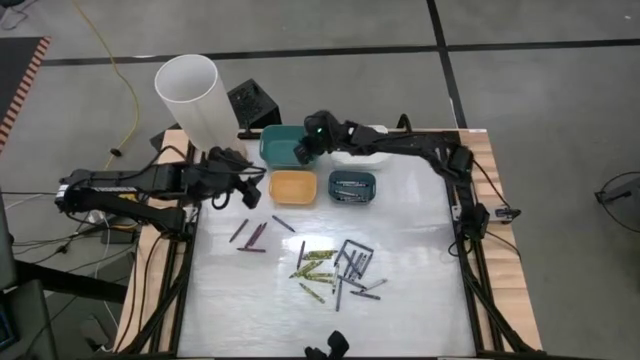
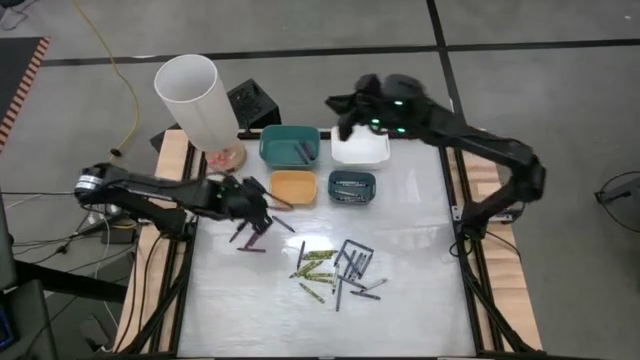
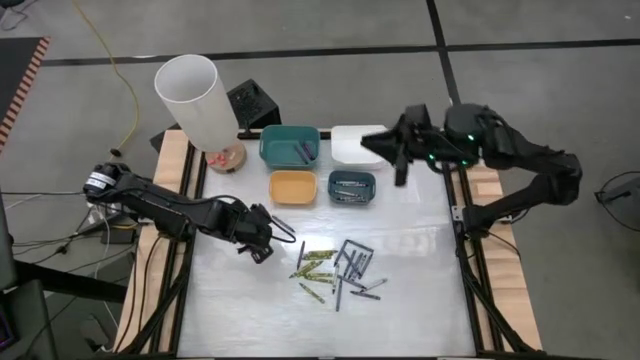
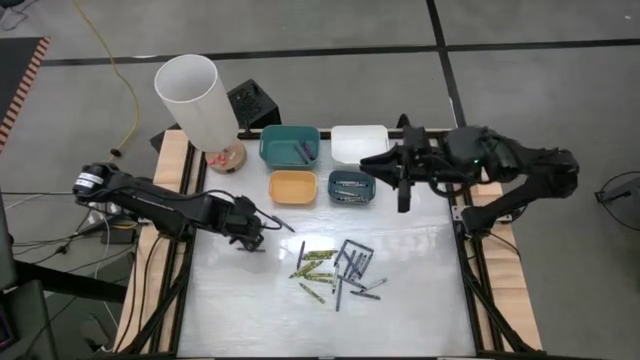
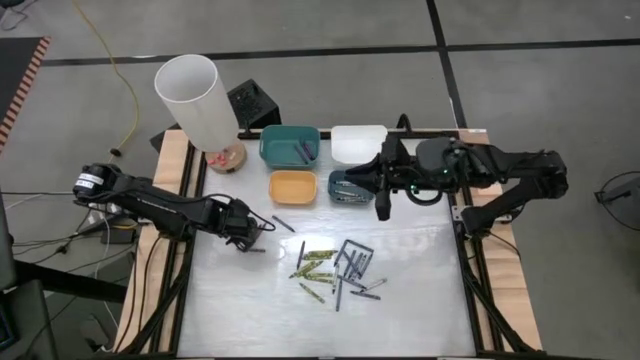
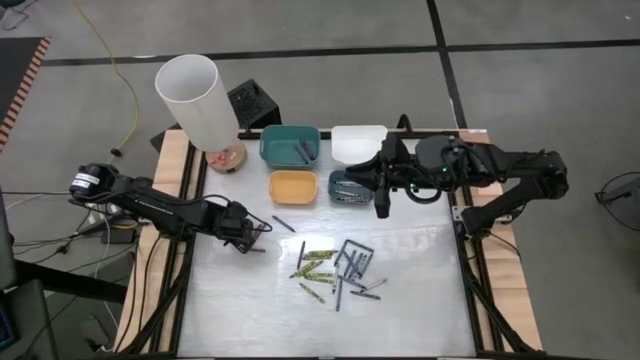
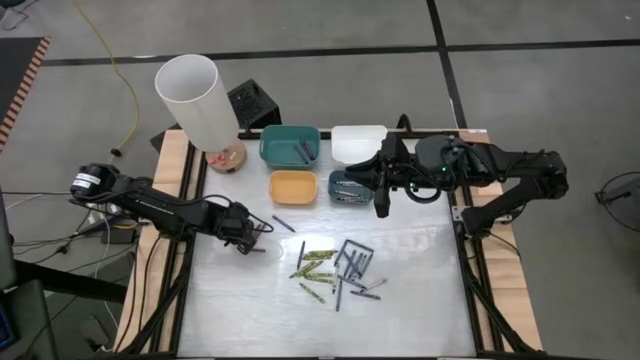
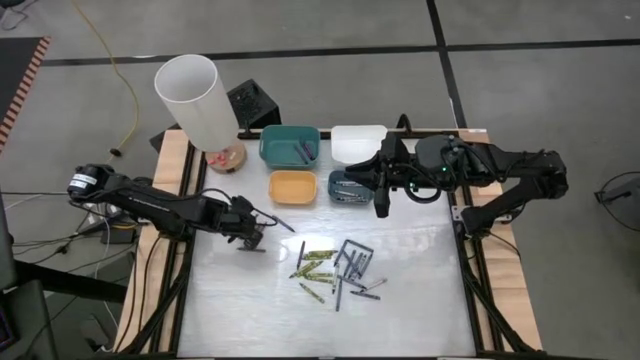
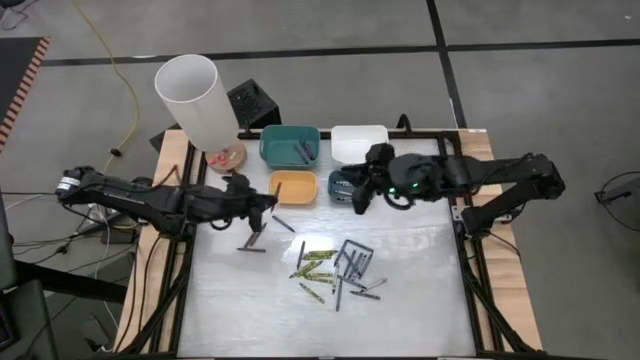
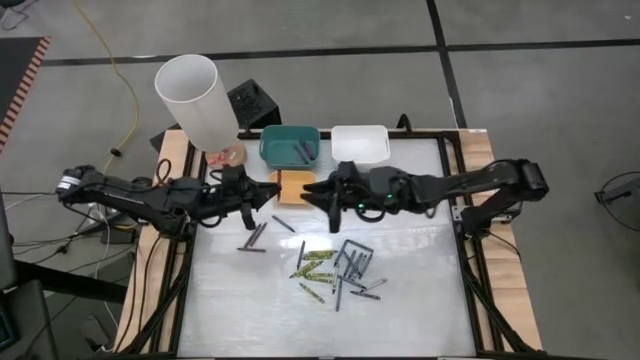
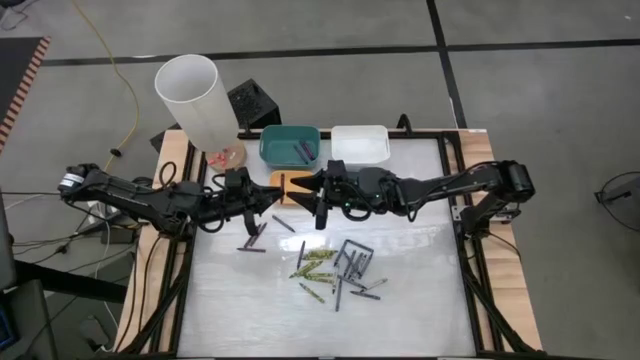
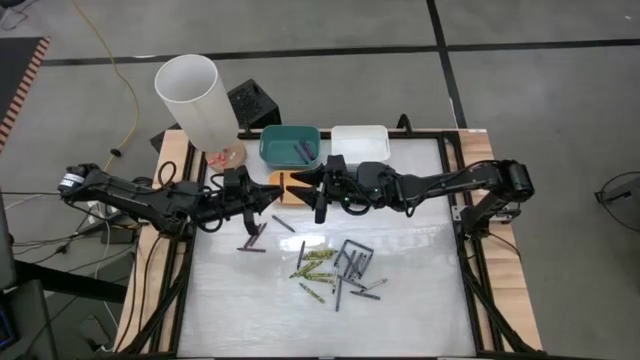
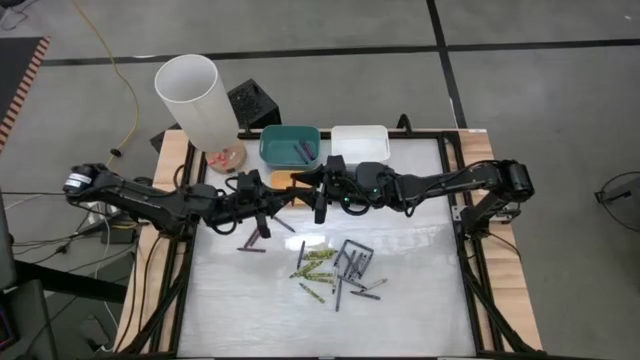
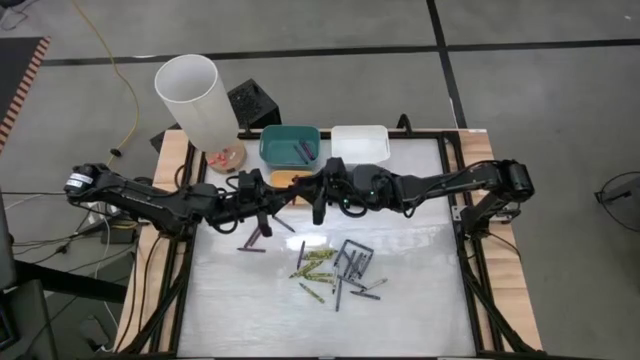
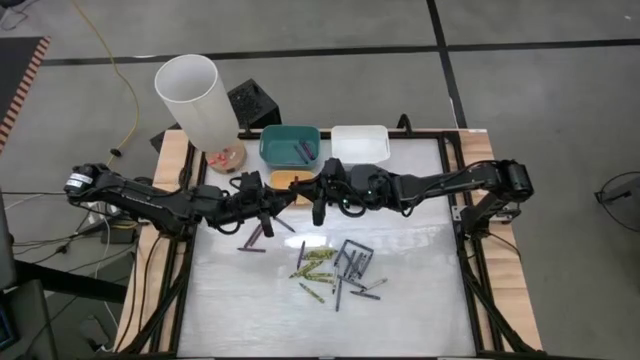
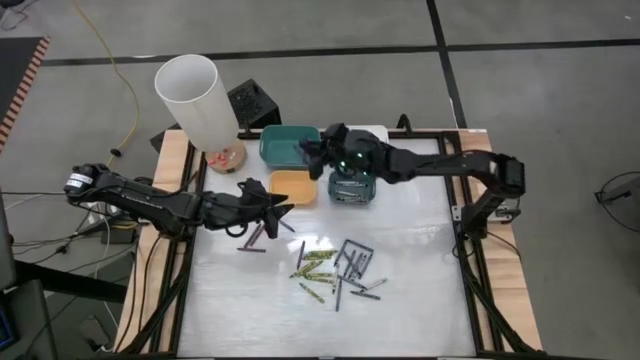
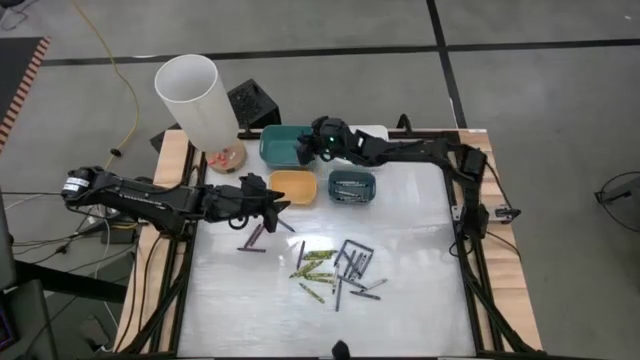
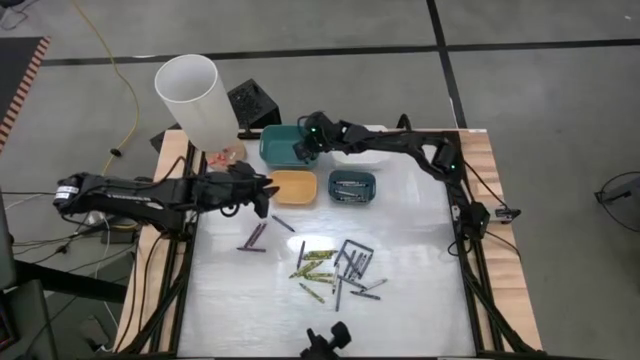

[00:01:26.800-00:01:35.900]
Task: Sort crayons
Put the violet crayon into the green bin

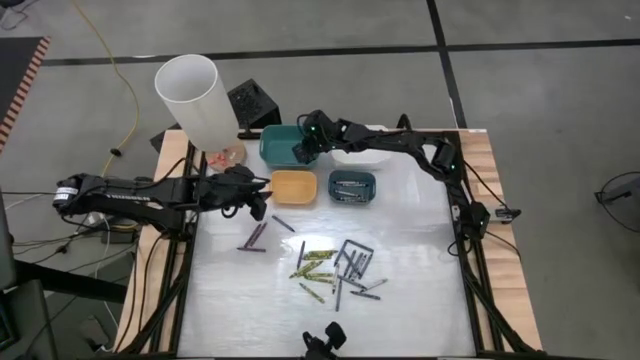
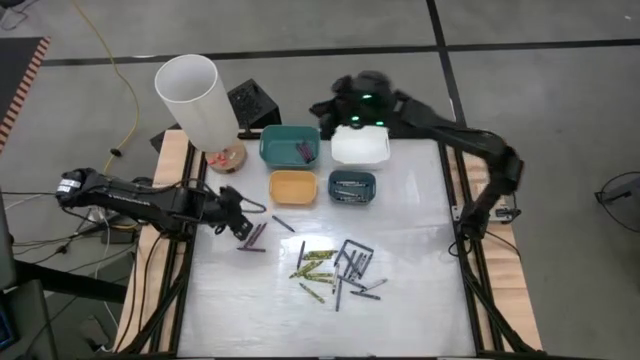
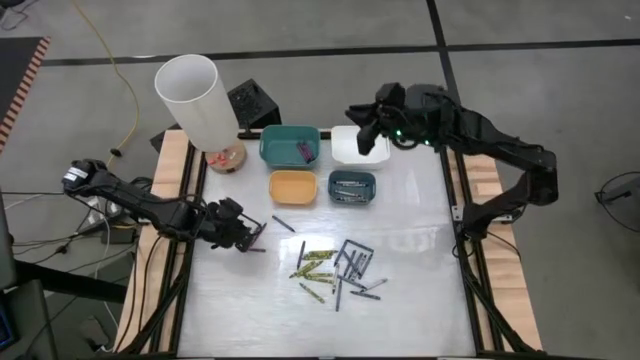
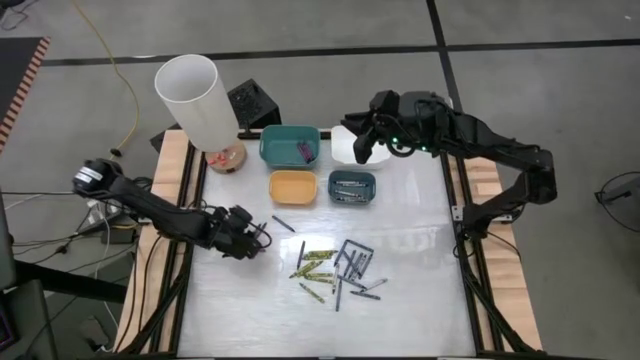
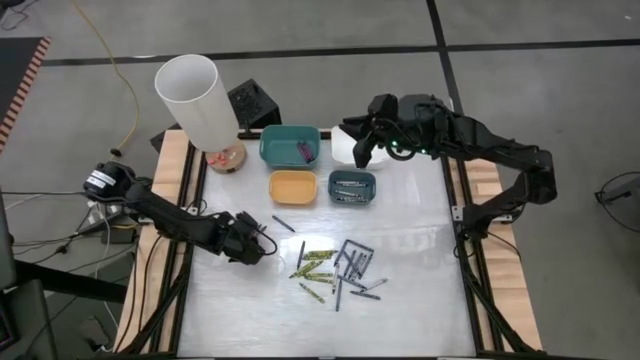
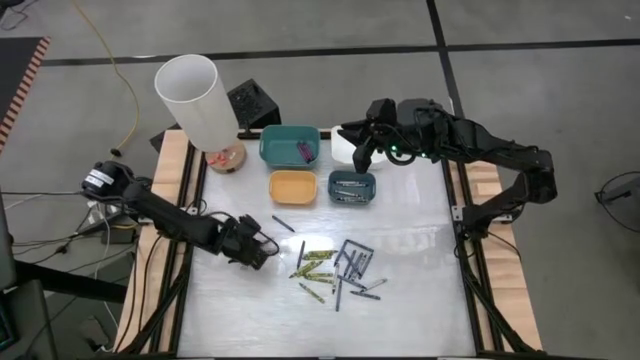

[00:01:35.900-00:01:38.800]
Put the violet crayon into the green bin

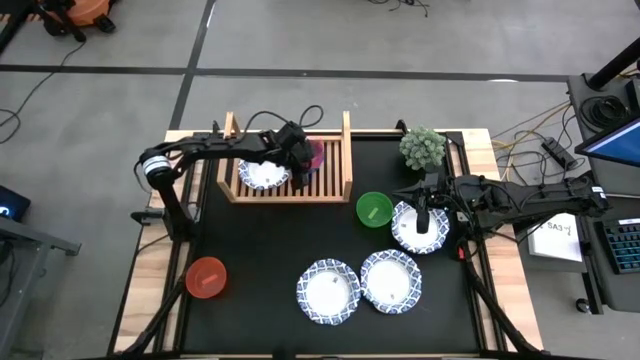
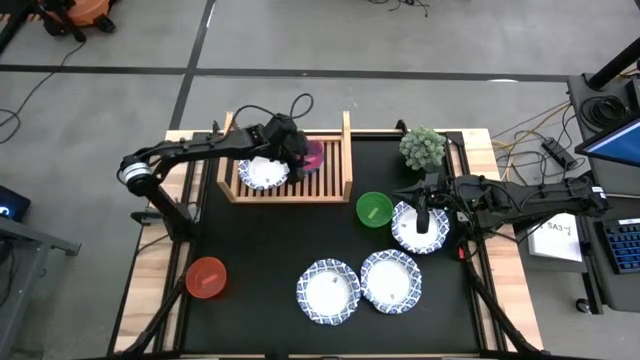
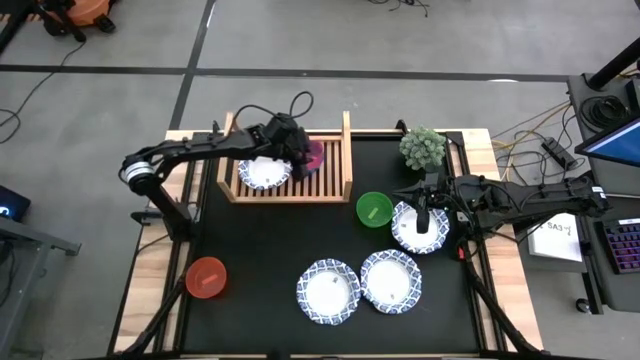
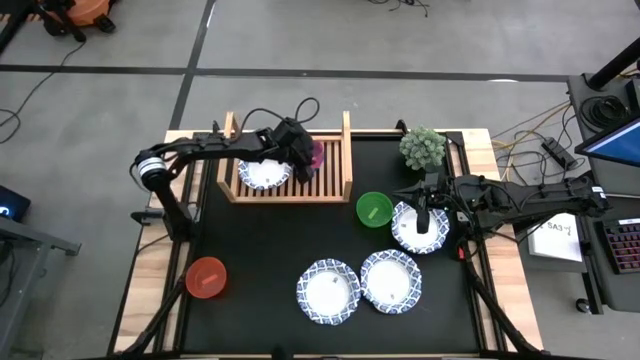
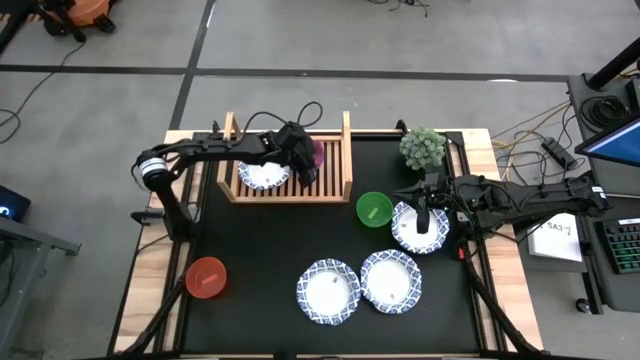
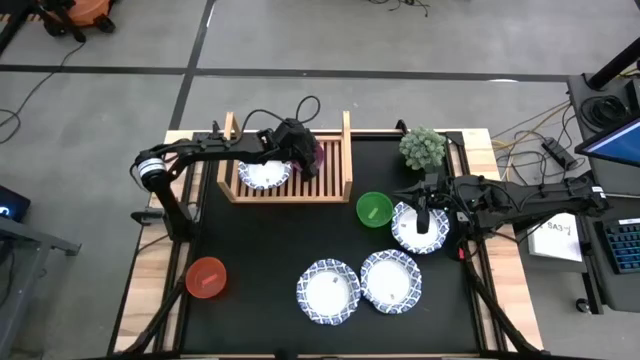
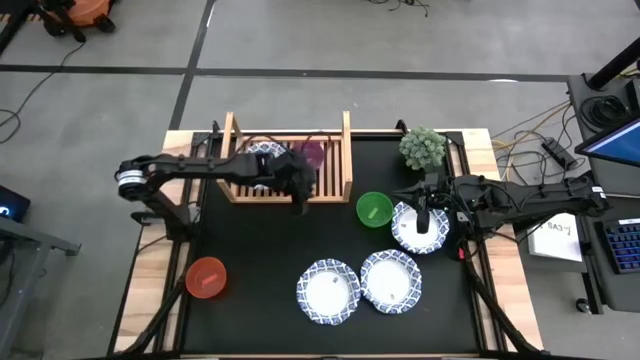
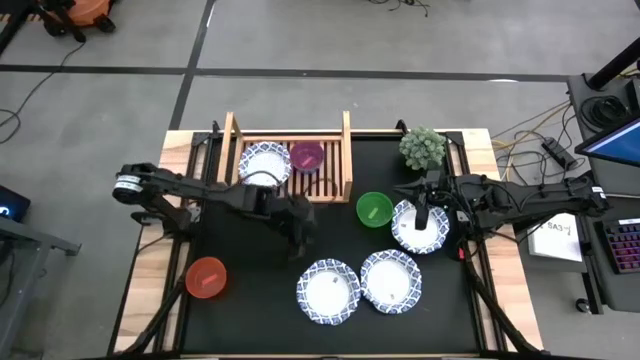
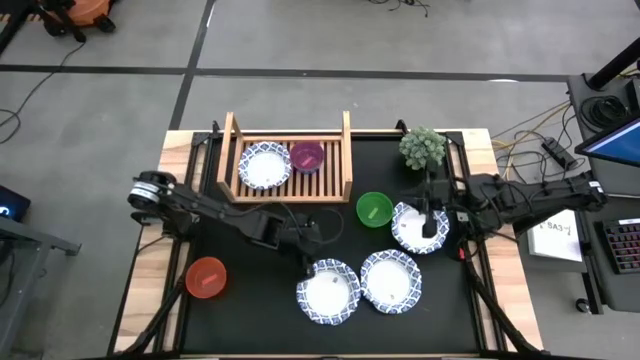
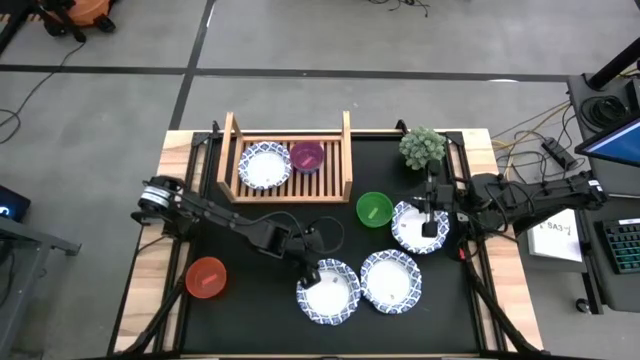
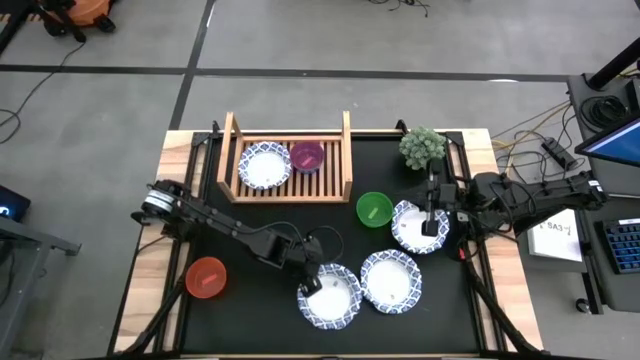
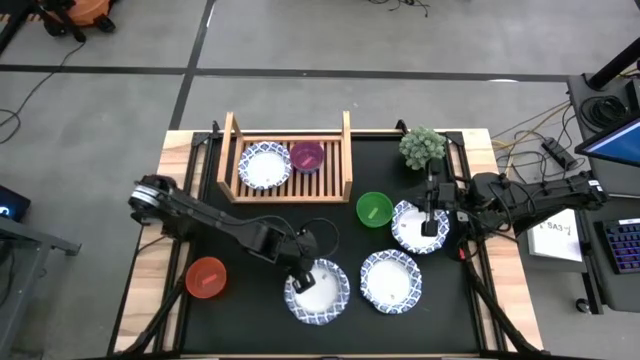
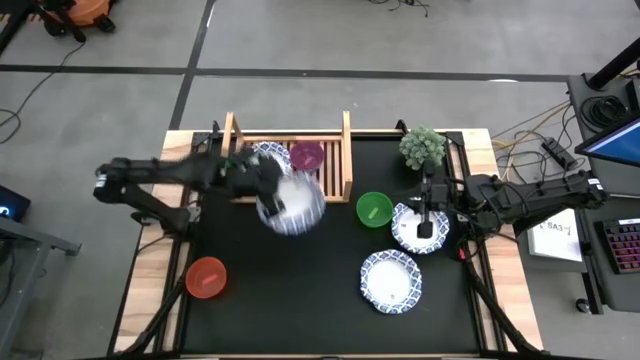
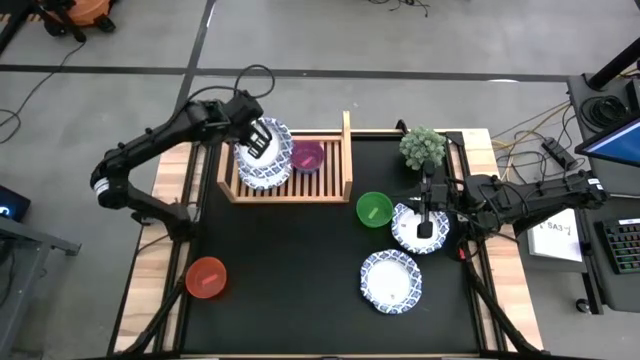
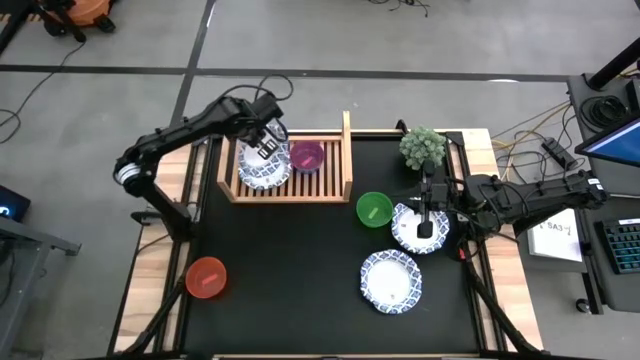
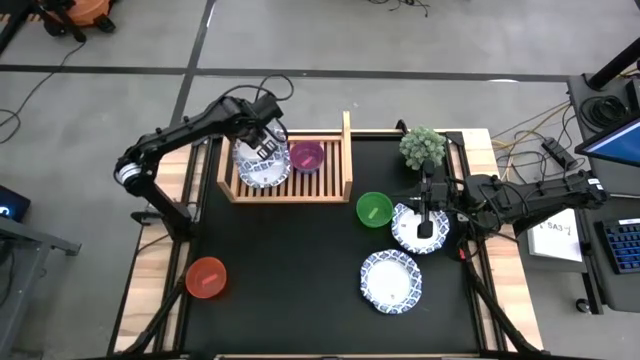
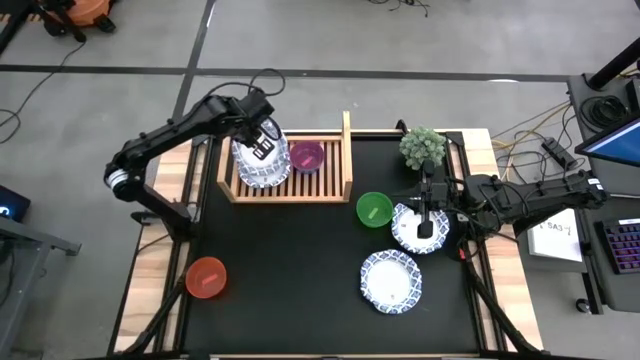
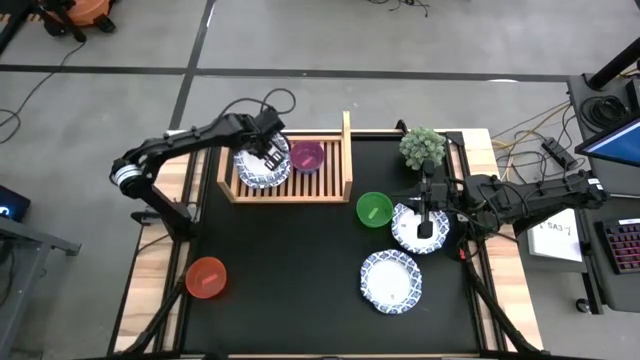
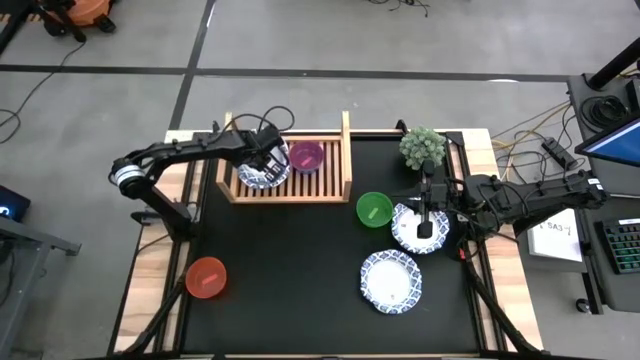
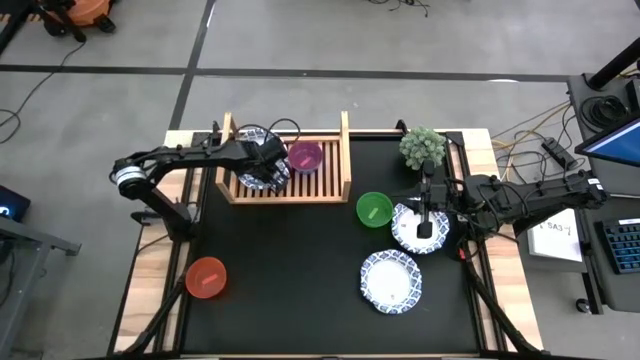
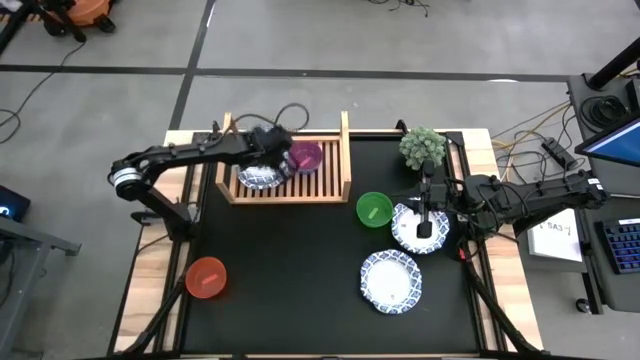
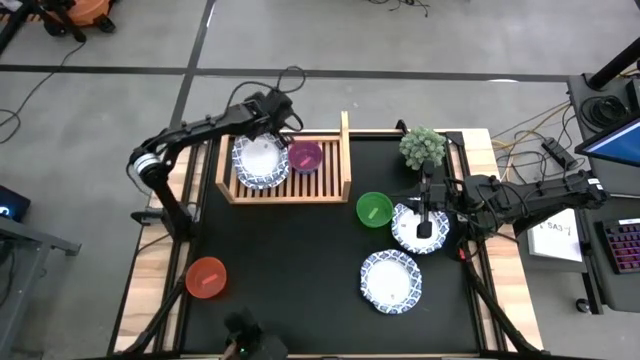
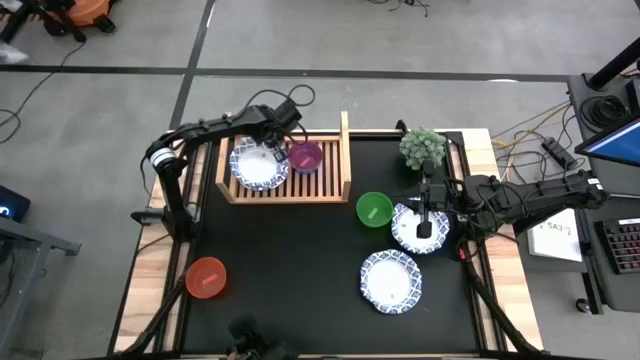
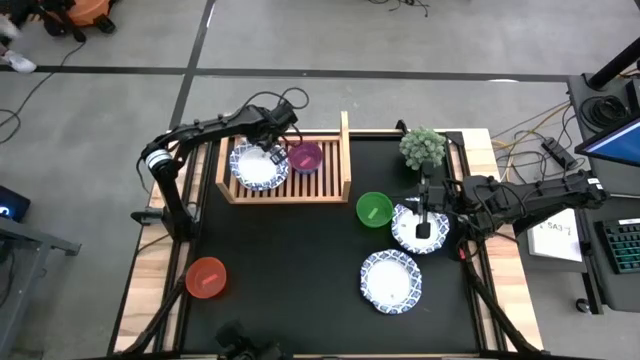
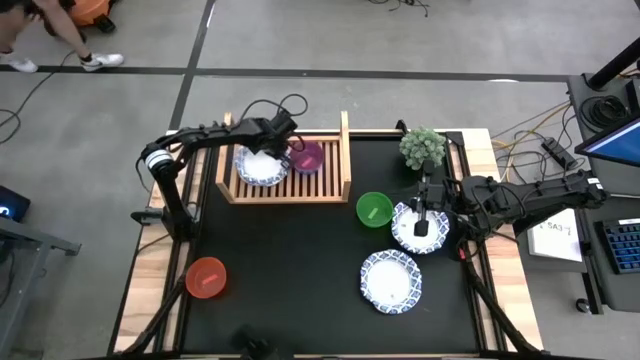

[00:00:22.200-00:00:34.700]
Task: Place and stack bowls onto a shelf
Stack the blue patterned bowl on top of the blue patterned bowl on the shelf
